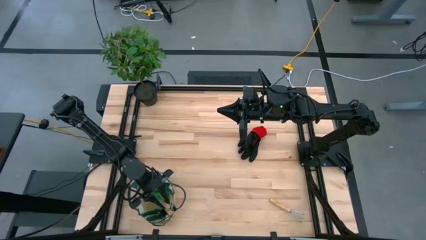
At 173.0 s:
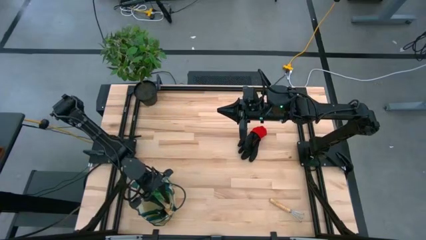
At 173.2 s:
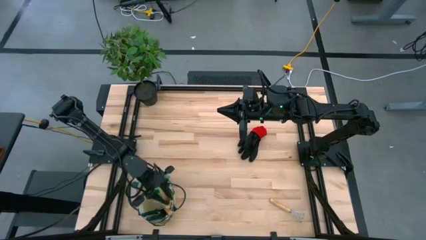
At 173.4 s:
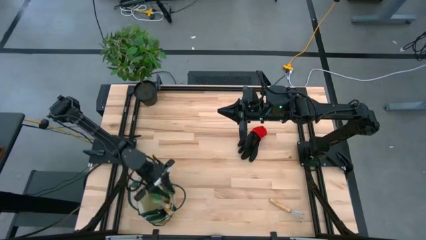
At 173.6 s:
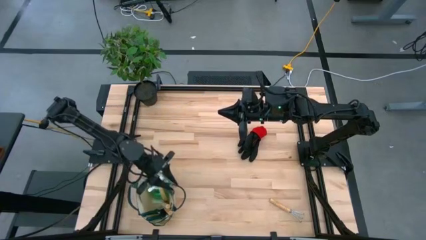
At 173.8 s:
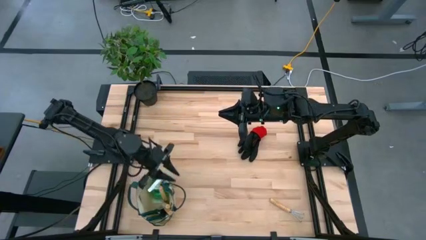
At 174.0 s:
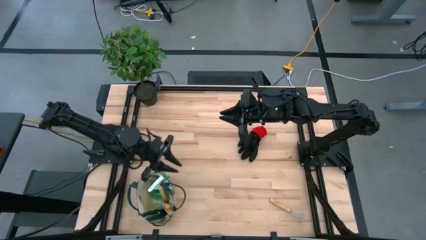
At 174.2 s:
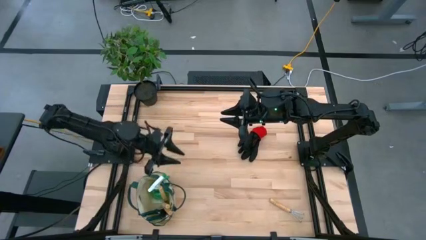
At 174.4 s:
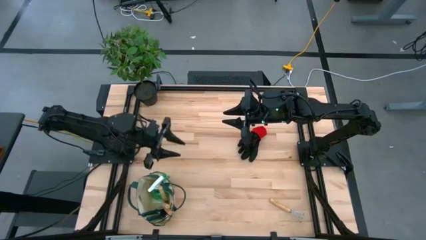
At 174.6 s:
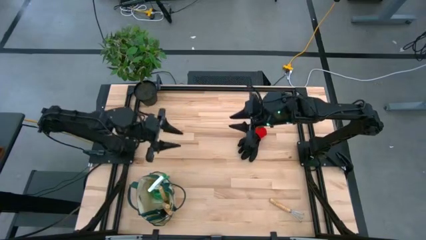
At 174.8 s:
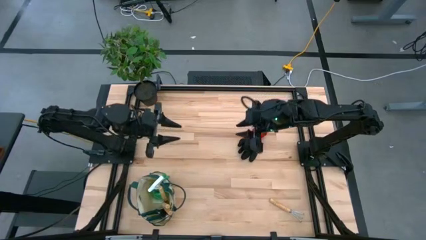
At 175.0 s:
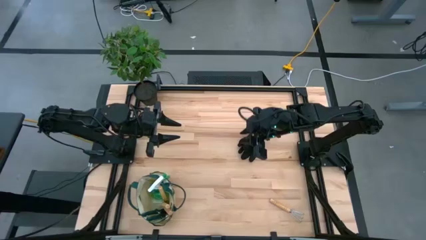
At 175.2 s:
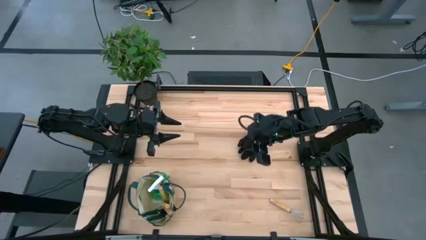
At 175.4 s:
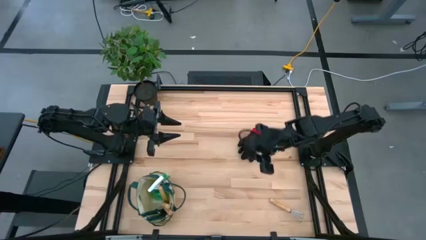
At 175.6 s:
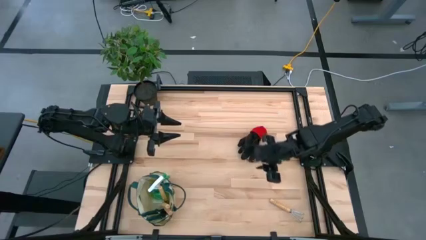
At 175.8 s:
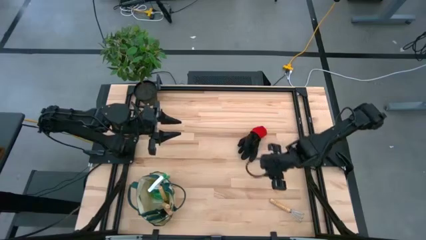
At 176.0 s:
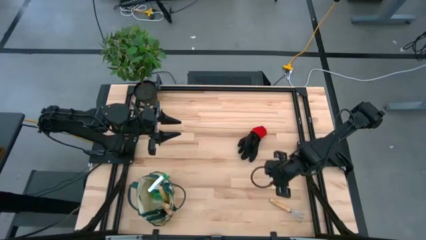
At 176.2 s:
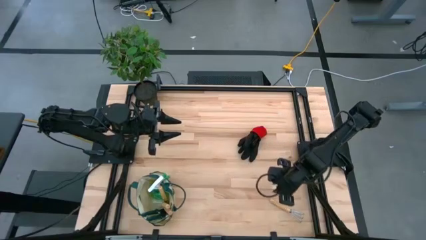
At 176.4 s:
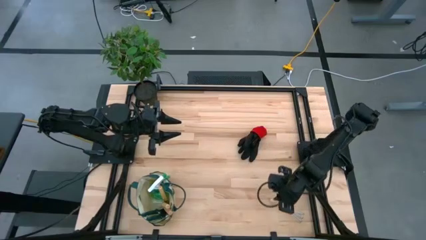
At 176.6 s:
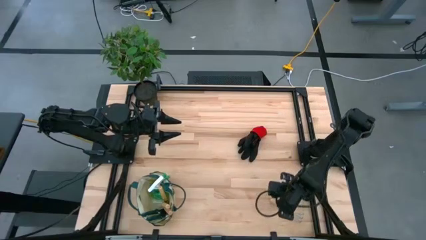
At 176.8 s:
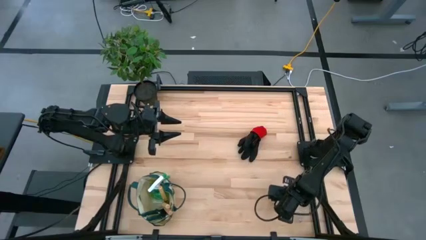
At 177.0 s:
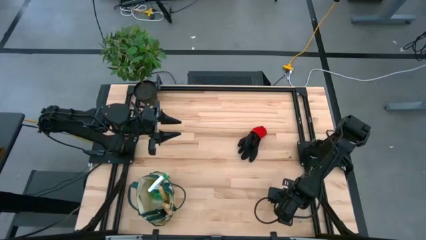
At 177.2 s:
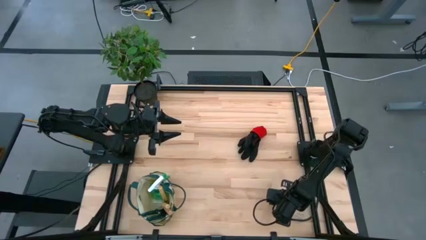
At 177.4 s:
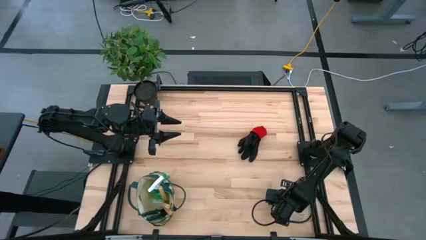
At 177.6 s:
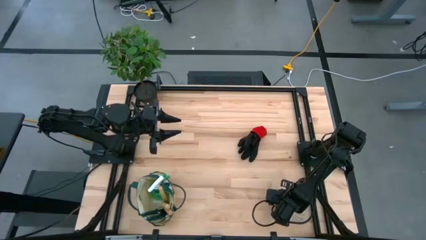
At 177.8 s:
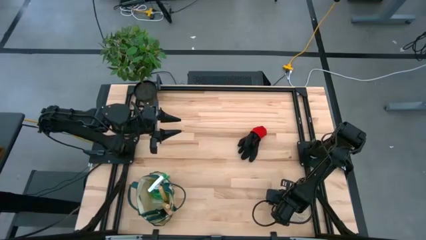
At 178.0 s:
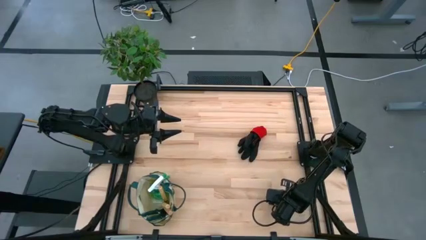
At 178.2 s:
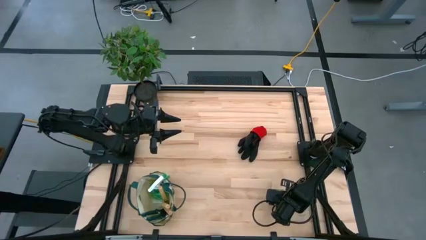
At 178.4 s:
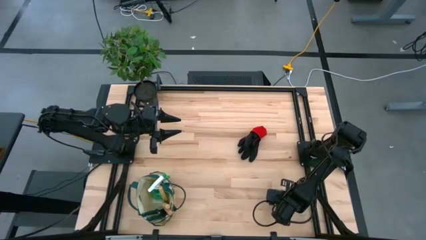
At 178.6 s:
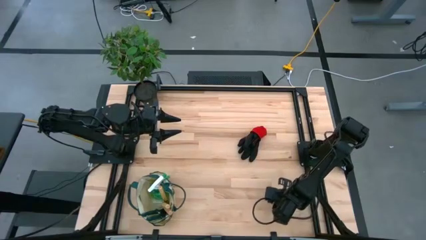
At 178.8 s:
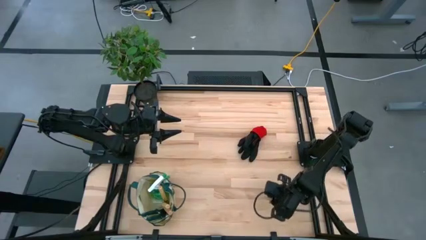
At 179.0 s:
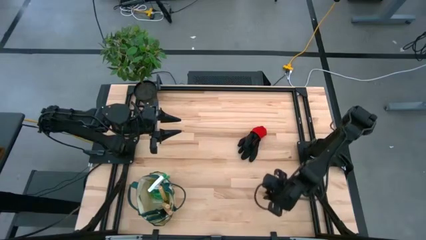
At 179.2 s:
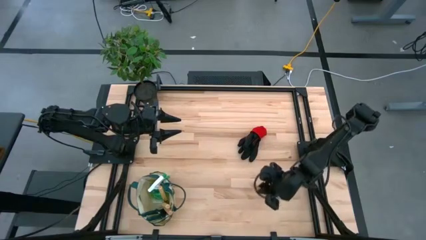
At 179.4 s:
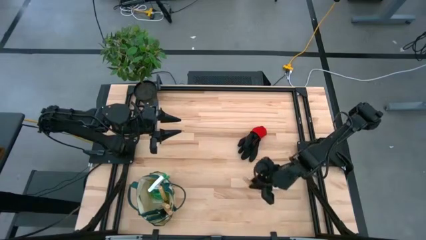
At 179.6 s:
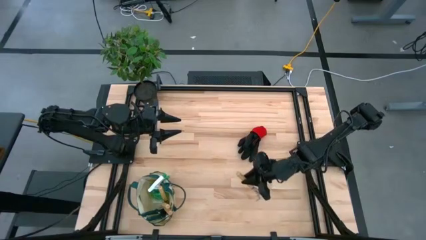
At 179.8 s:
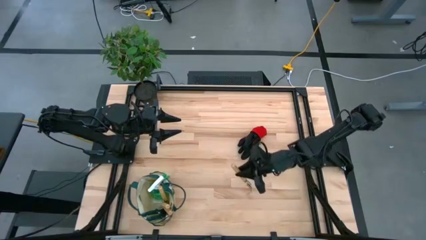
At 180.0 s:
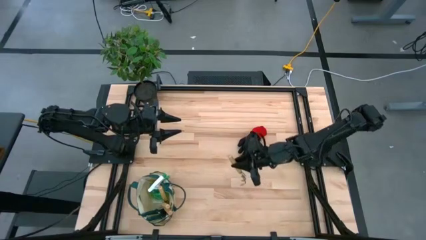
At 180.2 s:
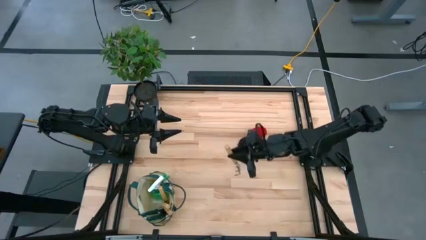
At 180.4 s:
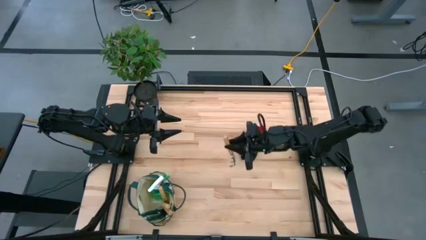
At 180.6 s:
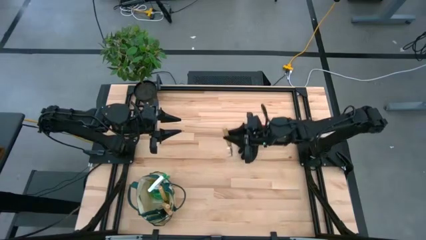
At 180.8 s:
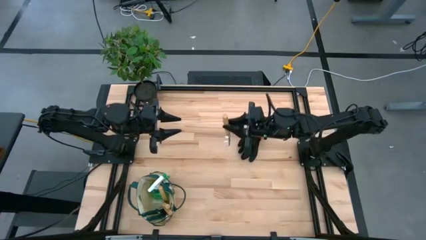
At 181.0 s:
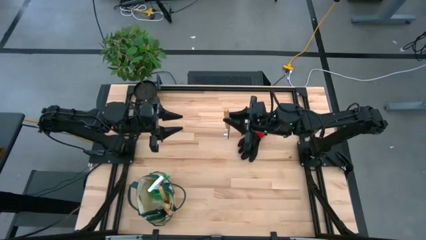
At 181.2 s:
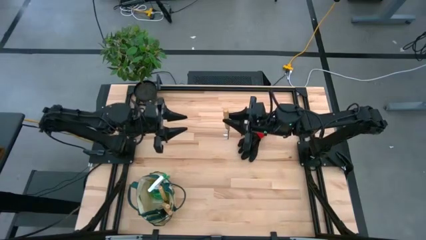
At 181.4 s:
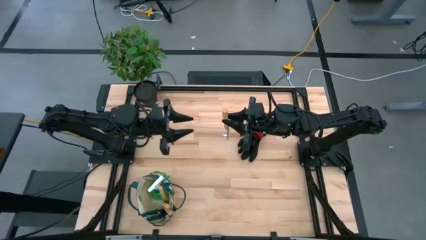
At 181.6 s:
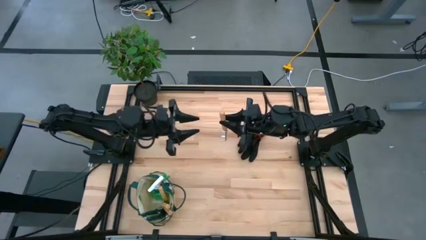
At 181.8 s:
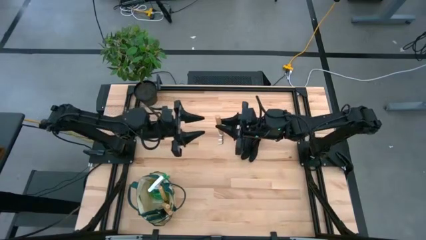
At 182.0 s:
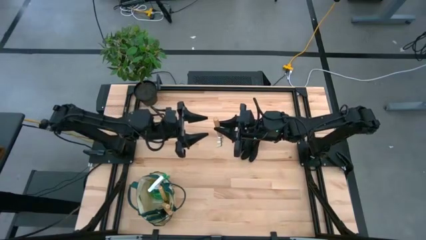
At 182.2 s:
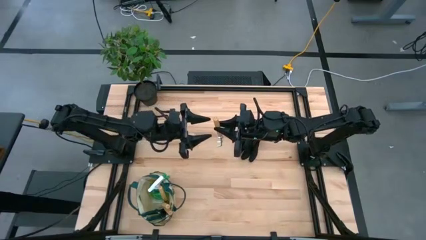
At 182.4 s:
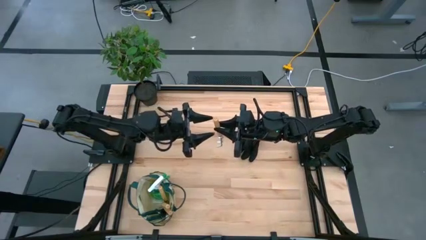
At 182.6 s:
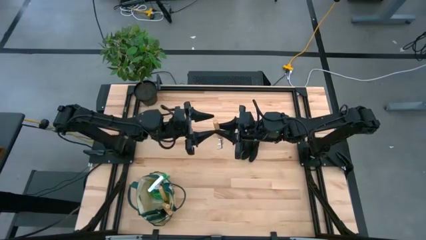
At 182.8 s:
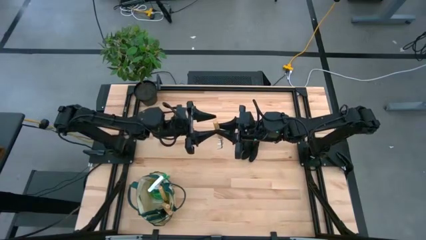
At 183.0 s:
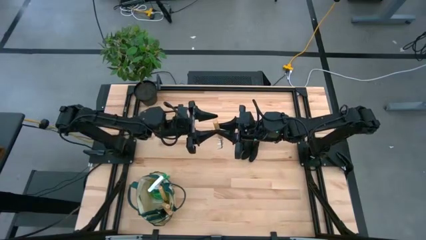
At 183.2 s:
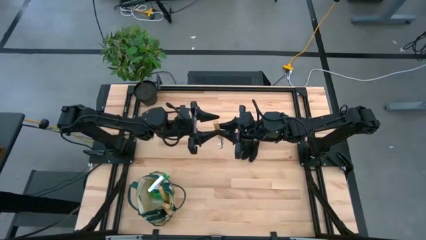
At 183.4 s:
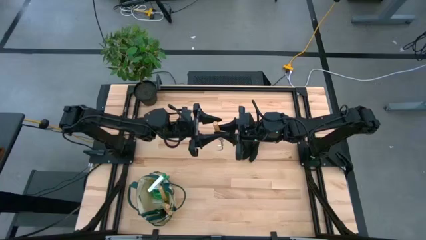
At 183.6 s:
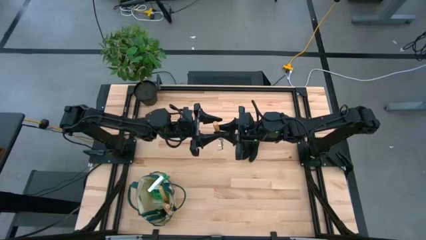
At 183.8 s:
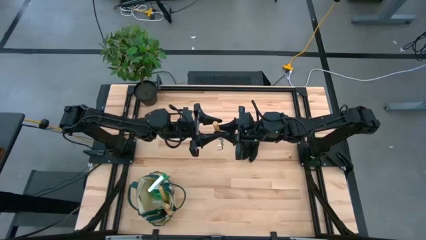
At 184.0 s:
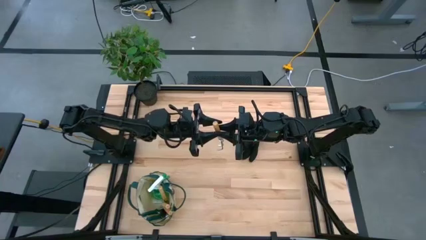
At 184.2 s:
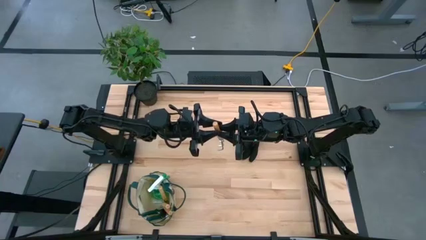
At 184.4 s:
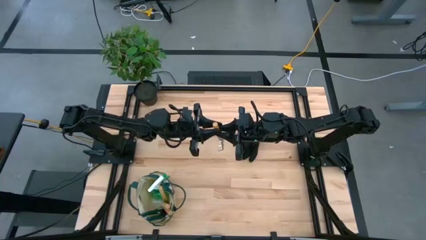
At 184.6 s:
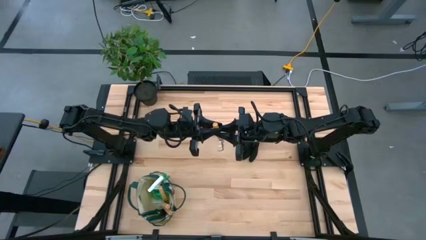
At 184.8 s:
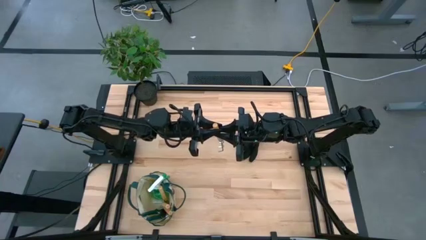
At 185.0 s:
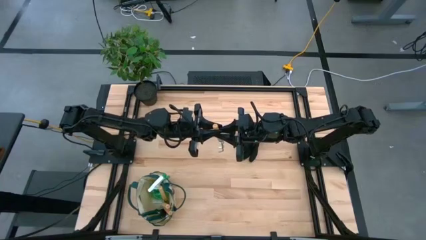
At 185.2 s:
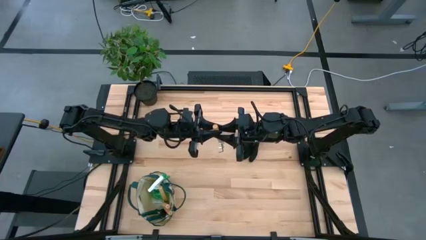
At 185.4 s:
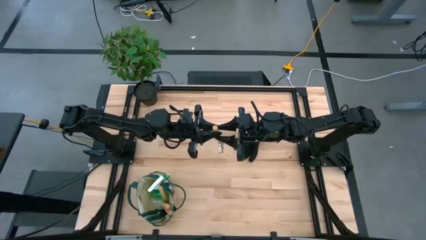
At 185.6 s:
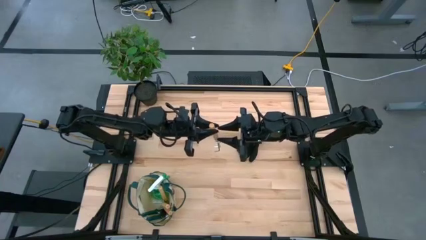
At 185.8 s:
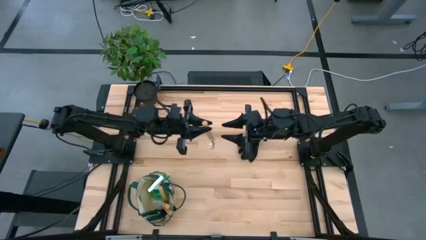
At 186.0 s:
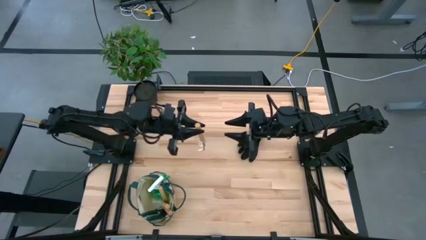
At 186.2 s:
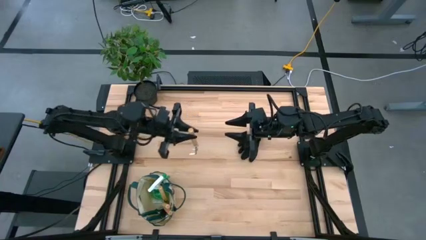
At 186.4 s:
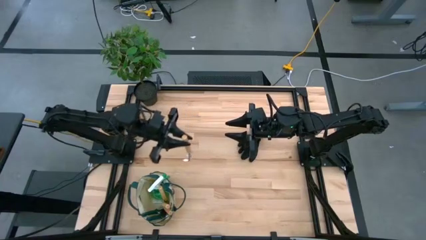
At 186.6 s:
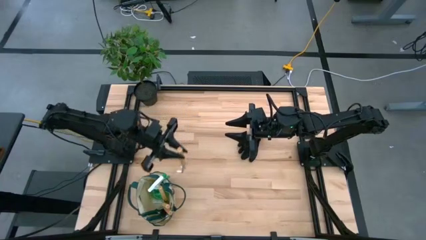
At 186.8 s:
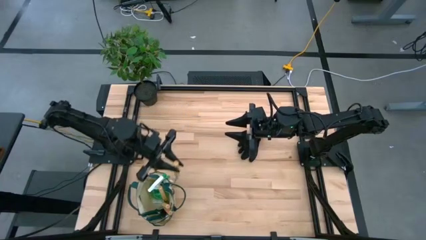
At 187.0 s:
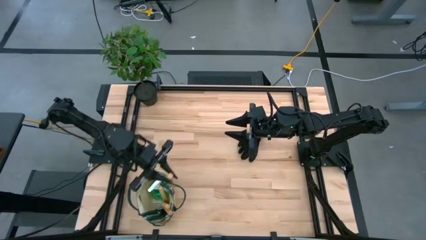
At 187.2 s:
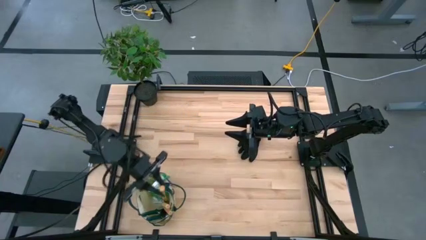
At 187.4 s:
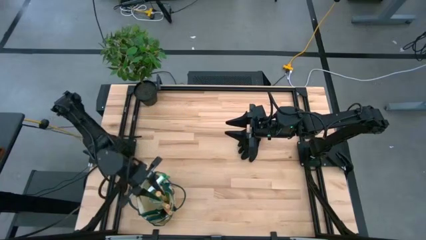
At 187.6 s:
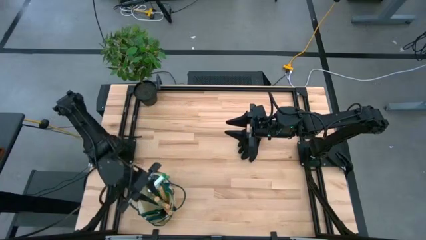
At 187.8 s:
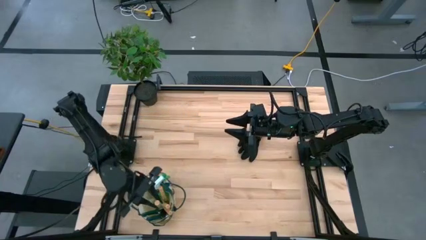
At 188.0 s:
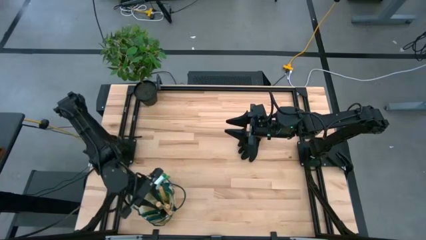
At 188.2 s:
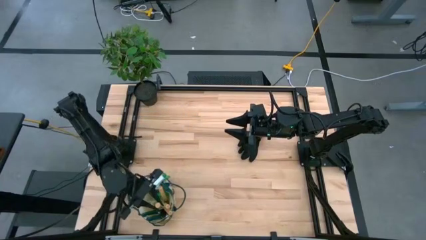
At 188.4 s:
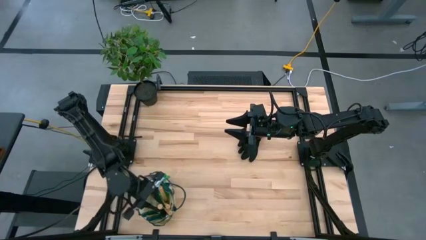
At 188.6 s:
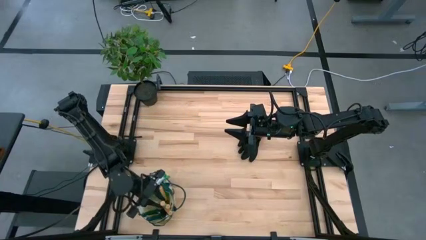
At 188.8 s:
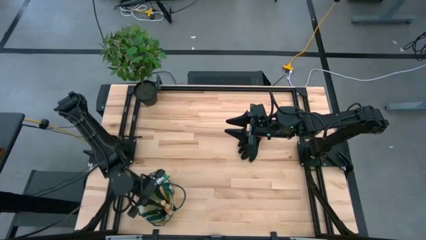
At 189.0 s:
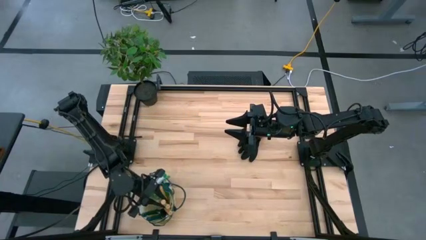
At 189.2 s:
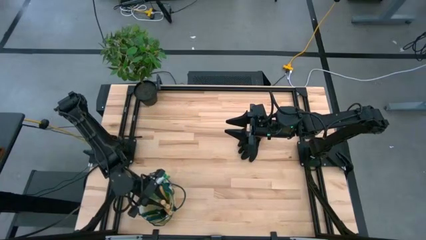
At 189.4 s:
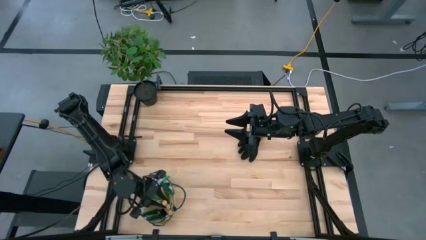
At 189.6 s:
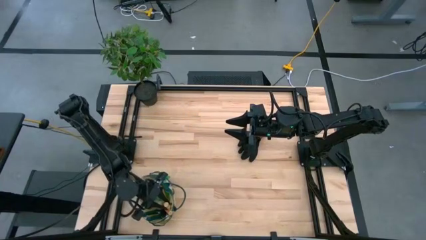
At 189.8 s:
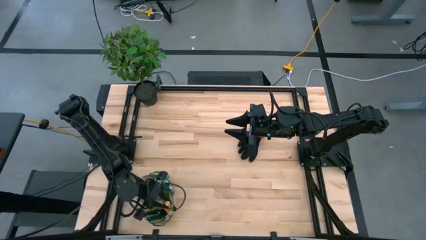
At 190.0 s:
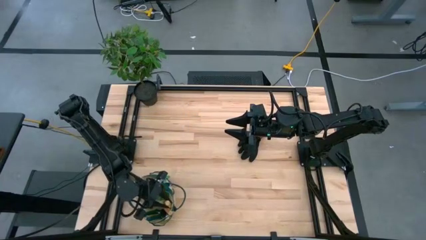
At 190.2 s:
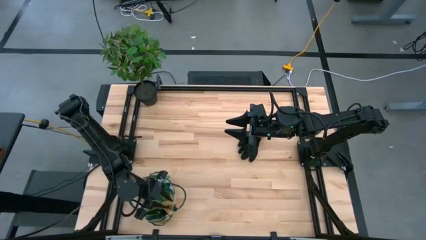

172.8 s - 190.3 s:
Task: Pick & Place Garden tools in Gardening bag
Put the hand rake into the gardening bag
